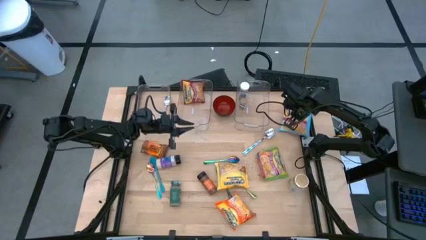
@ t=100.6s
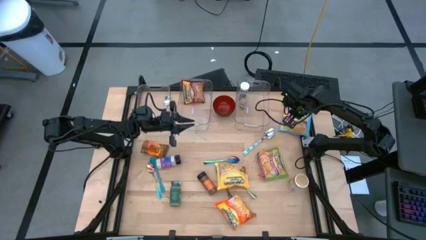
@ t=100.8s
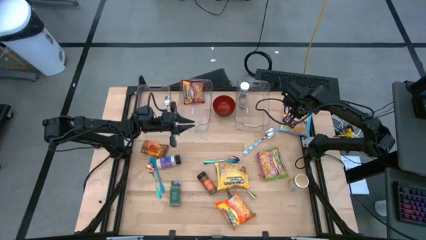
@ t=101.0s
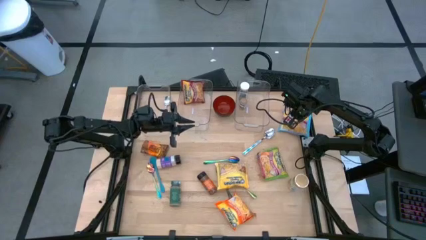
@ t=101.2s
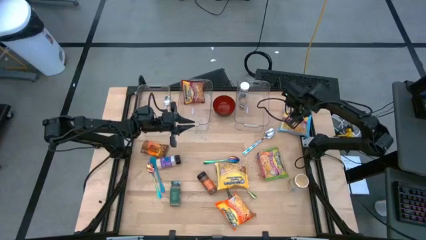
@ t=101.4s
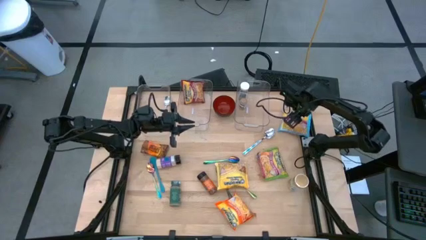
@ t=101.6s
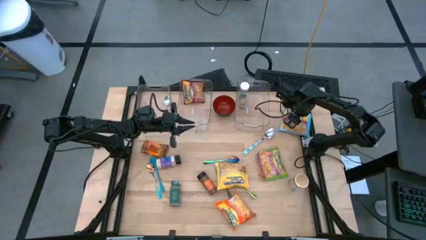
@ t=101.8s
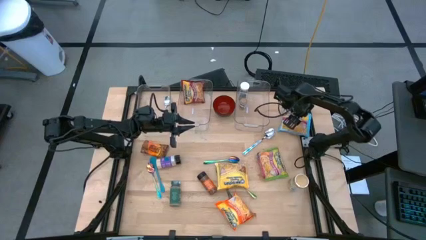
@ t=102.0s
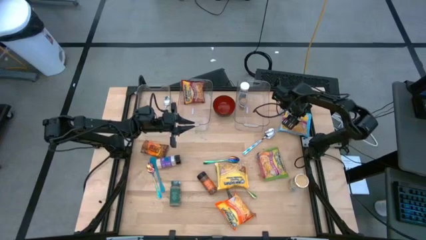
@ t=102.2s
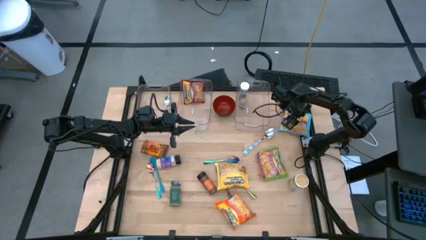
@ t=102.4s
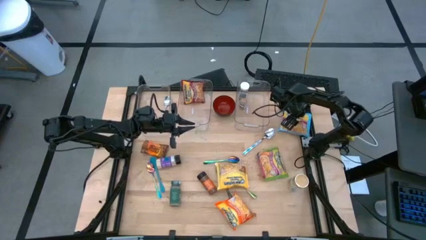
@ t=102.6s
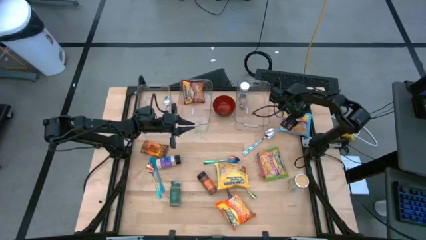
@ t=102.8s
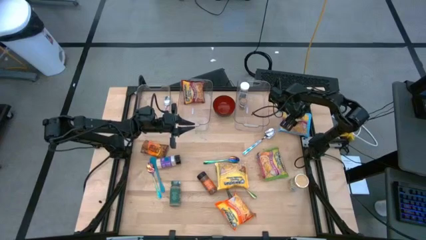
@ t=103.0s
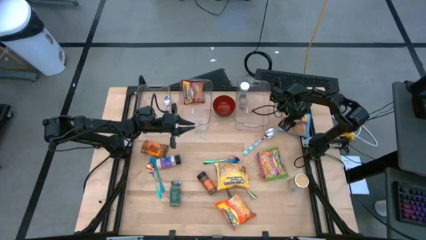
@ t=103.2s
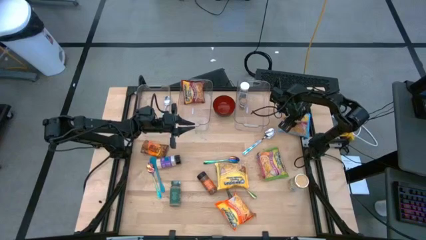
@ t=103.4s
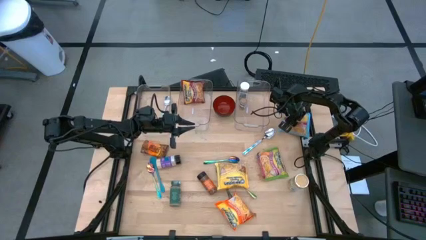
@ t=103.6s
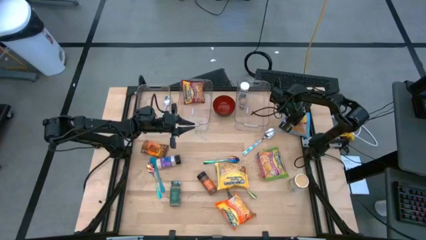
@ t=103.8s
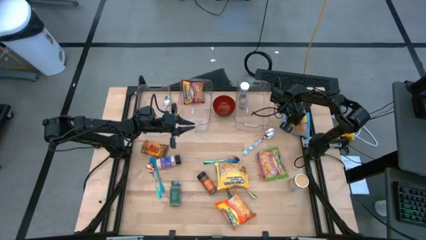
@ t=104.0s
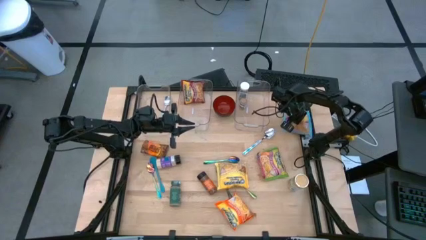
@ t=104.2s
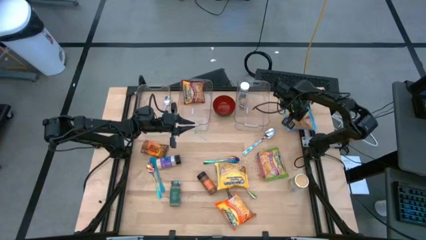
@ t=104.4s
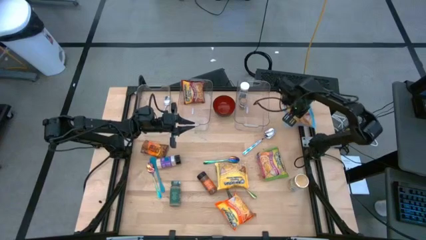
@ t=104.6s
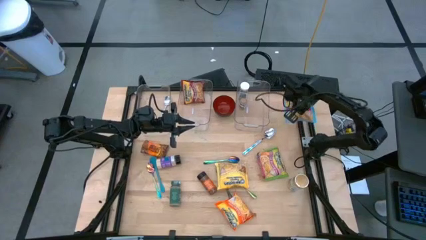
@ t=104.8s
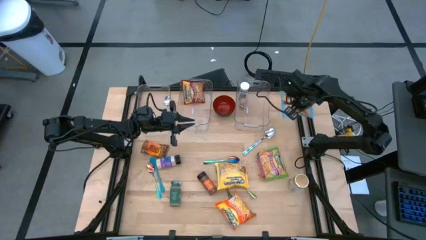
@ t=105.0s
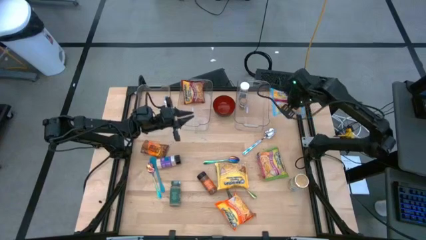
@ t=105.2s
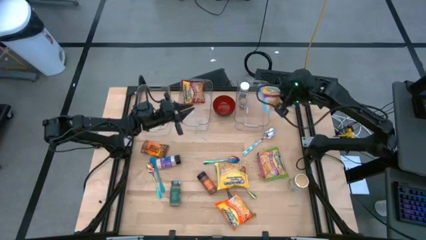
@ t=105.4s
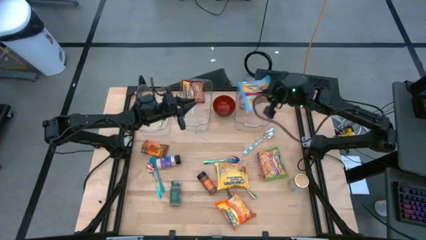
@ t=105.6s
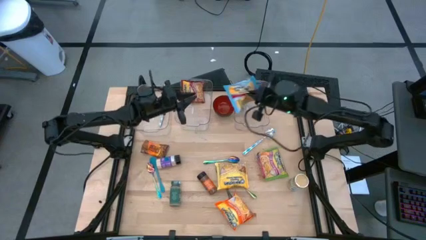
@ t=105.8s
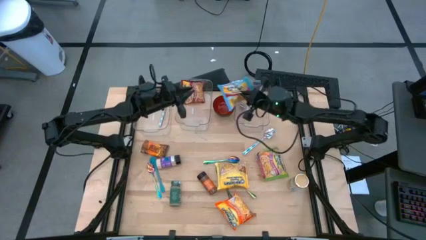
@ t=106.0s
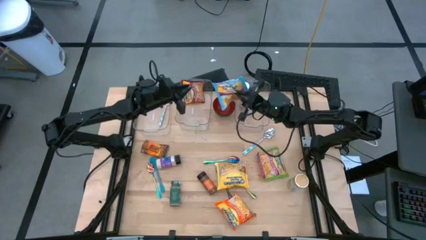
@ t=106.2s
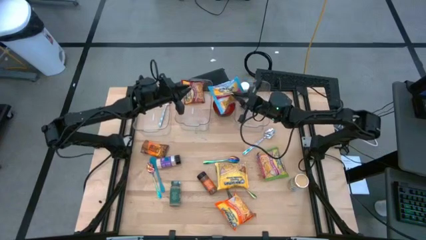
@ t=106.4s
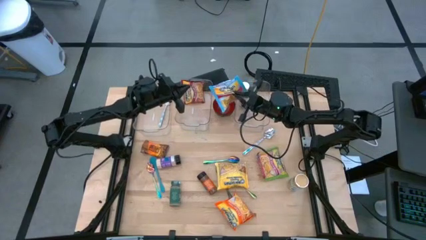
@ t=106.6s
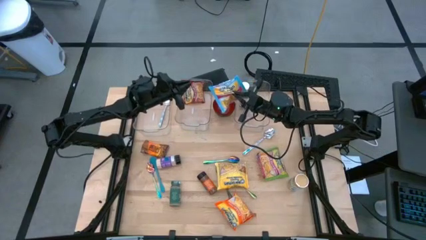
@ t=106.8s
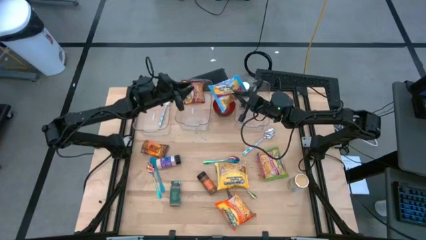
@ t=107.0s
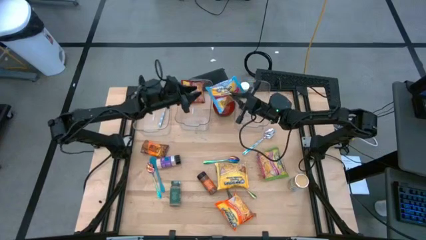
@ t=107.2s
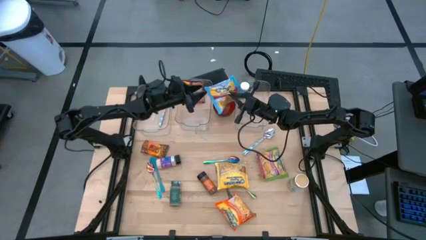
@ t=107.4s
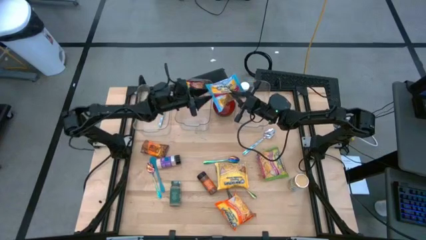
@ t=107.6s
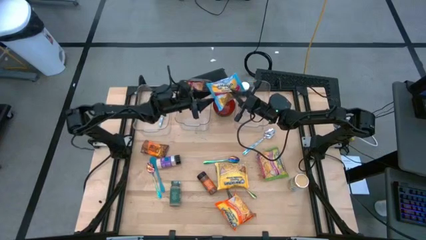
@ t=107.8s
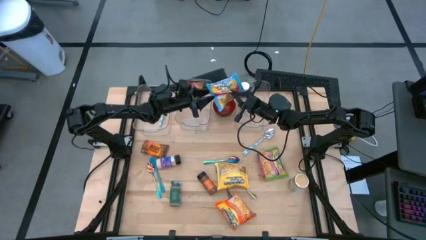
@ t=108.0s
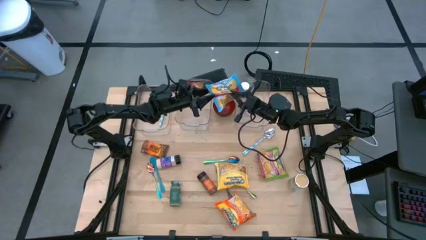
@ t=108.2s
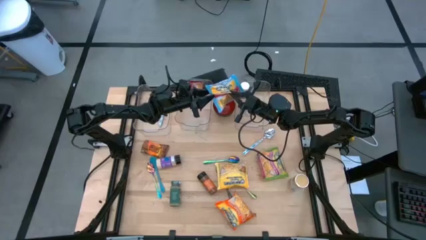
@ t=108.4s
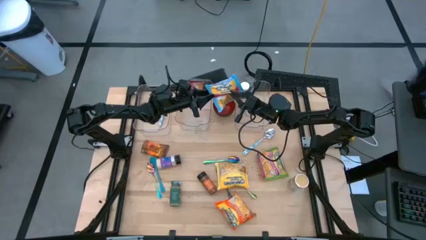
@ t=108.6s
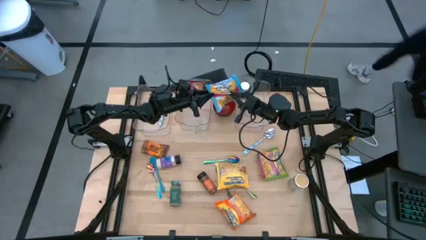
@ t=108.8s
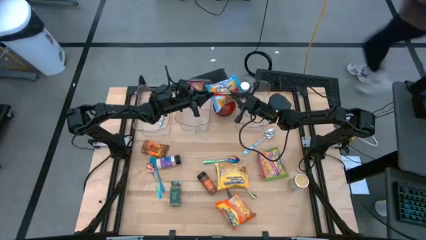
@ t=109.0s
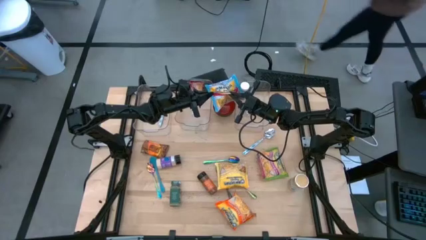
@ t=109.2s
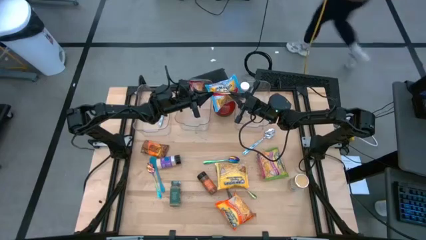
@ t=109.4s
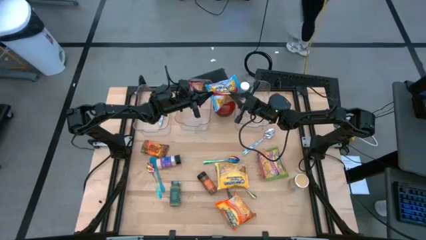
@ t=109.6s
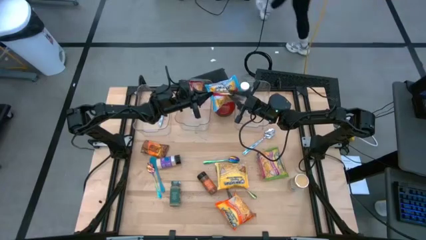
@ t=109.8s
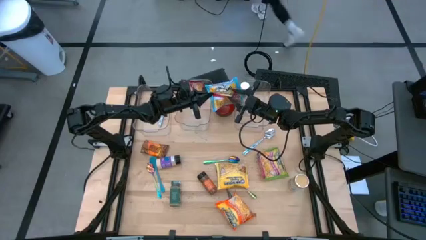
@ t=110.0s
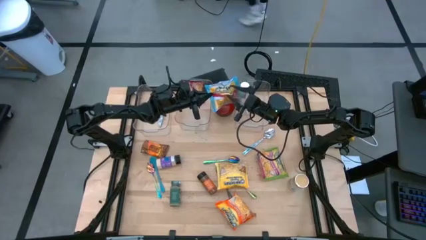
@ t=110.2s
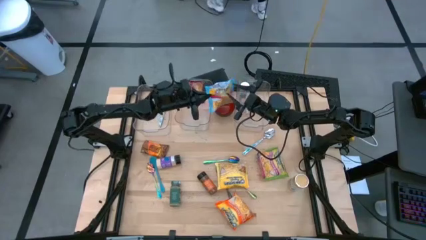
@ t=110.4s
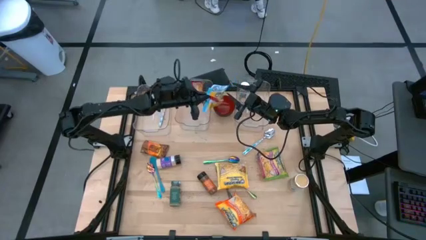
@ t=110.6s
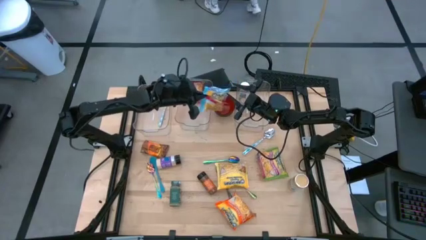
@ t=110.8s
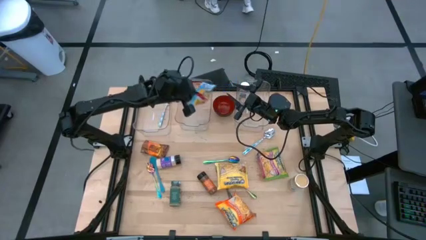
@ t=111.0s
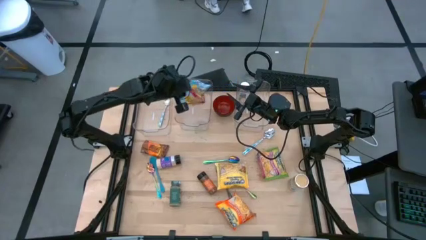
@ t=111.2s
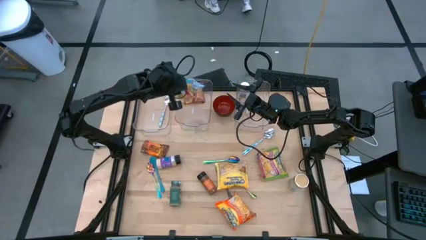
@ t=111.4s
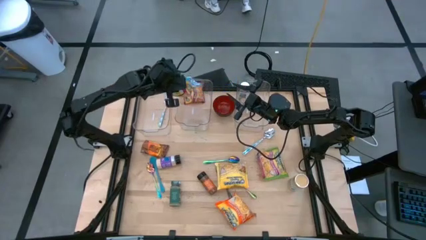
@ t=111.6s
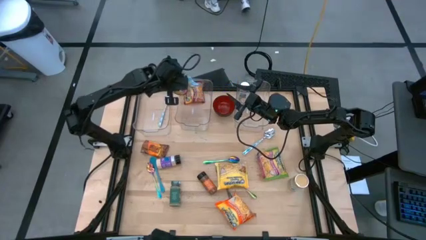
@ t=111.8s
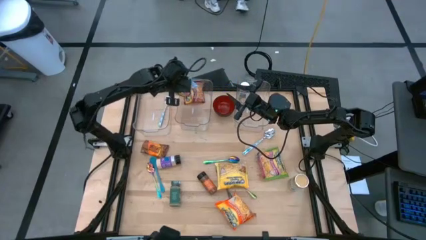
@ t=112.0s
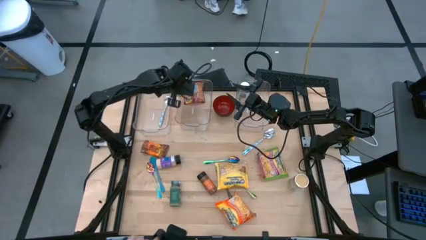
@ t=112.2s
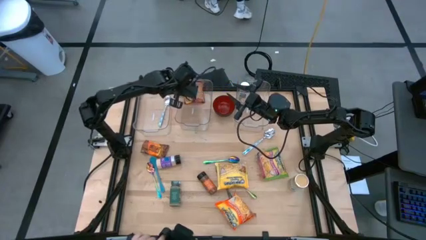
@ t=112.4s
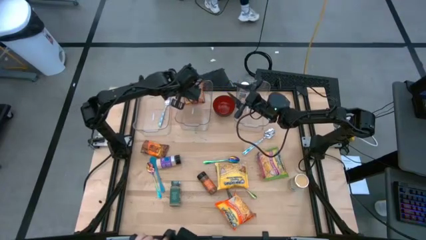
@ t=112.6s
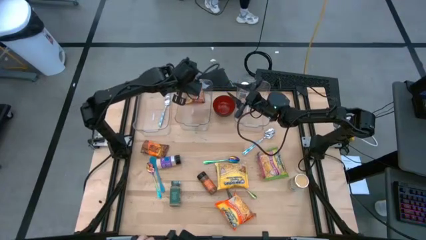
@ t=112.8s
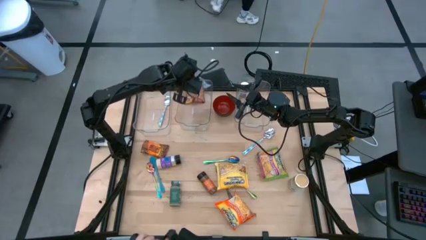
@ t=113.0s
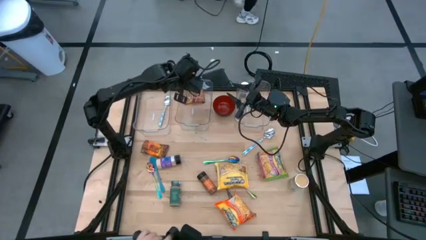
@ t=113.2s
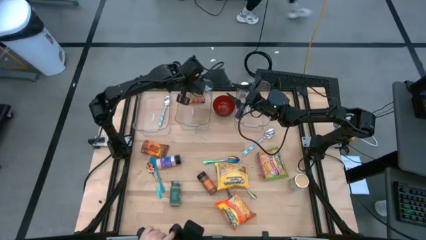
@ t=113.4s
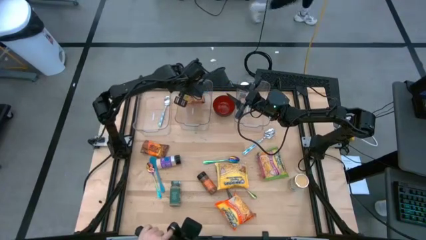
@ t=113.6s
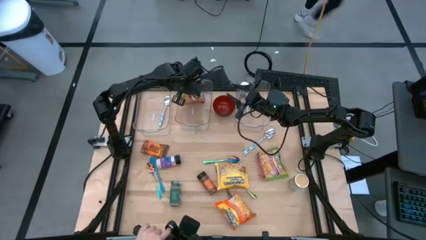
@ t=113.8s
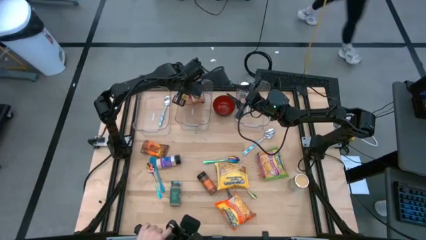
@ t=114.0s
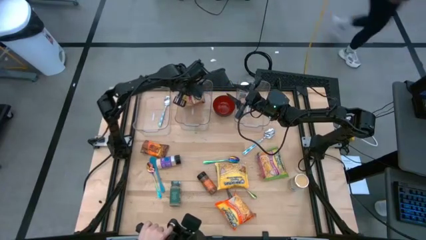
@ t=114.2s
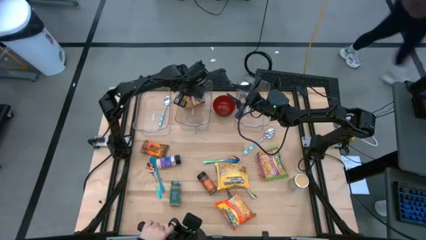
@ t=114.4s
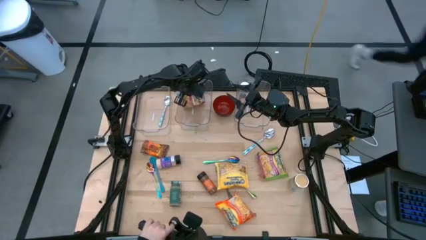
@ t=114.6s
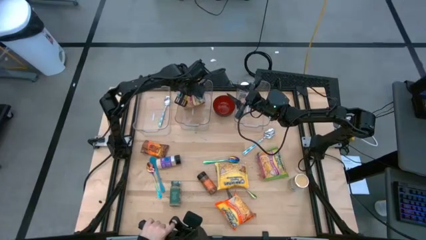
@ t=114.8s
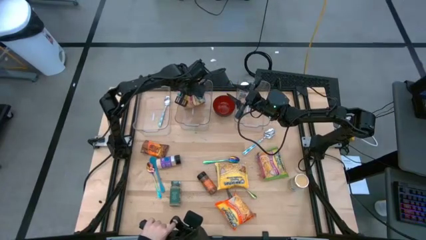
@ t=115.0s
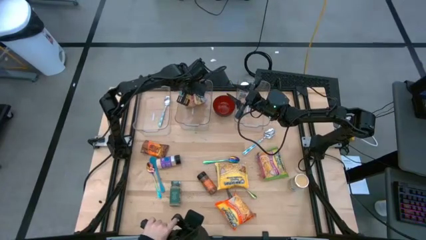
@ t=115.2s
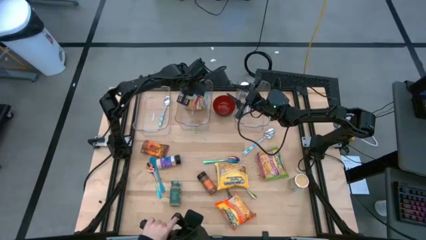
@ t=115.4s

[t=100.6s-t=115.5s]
Task: Pick & Place Food Item
Put the blue noodle pack into the middle transparent bin
